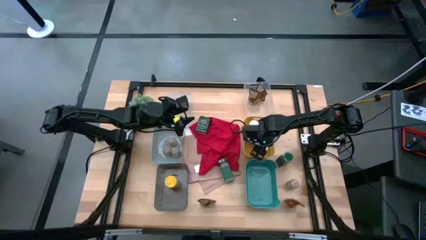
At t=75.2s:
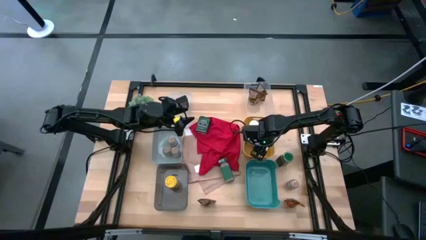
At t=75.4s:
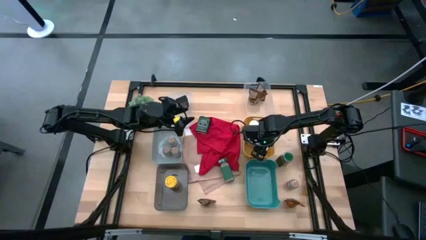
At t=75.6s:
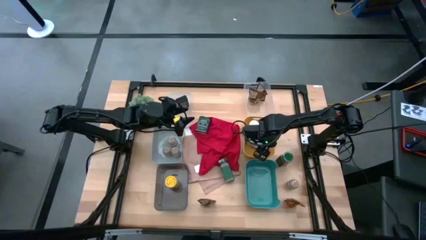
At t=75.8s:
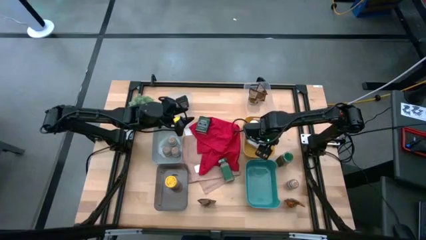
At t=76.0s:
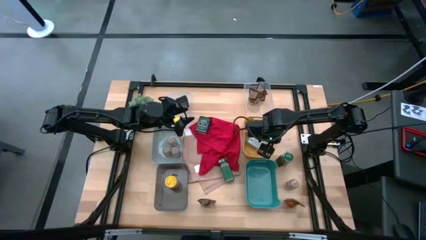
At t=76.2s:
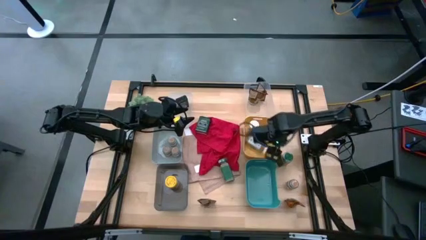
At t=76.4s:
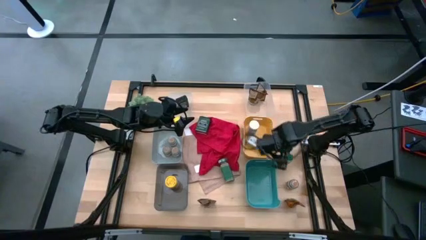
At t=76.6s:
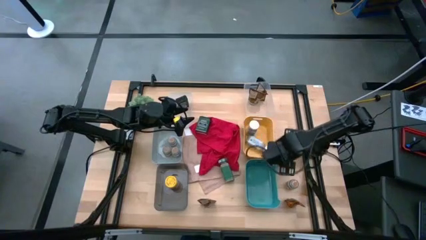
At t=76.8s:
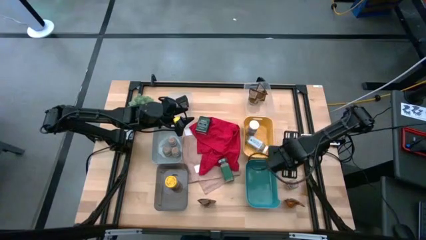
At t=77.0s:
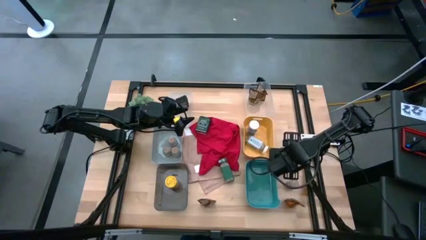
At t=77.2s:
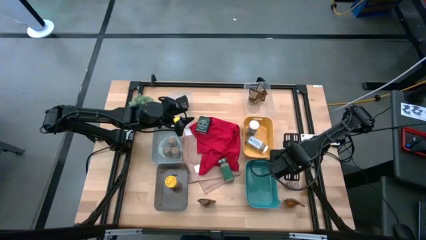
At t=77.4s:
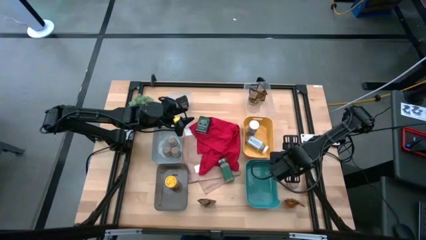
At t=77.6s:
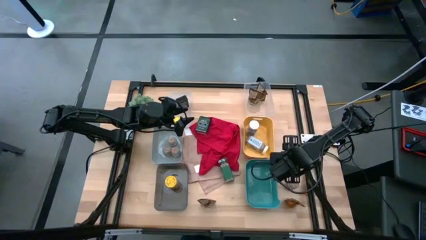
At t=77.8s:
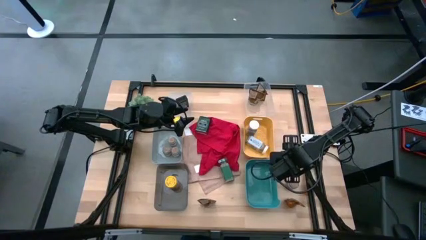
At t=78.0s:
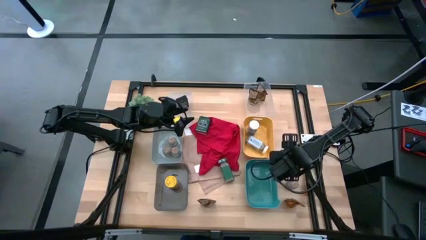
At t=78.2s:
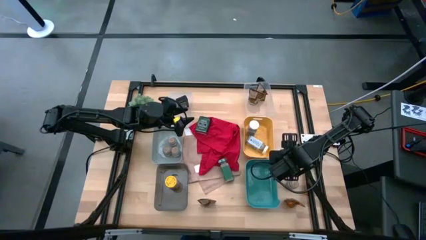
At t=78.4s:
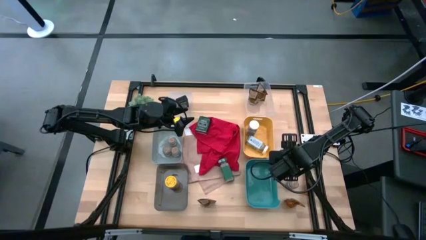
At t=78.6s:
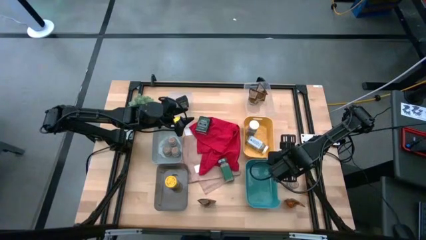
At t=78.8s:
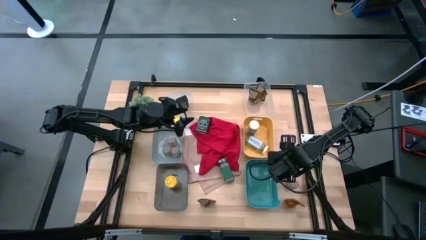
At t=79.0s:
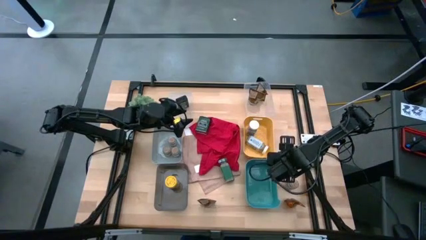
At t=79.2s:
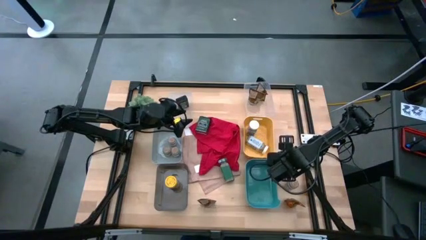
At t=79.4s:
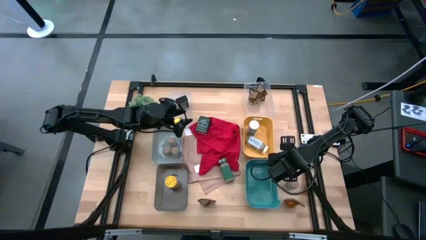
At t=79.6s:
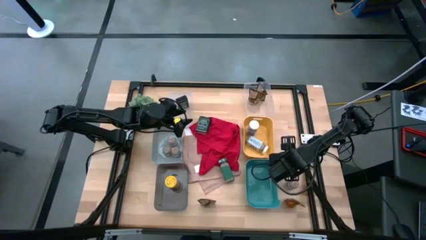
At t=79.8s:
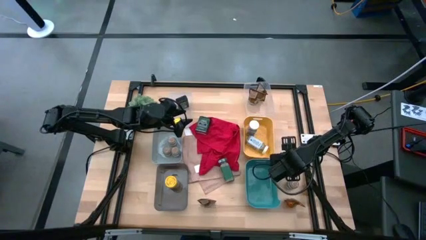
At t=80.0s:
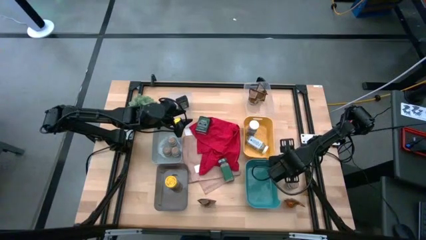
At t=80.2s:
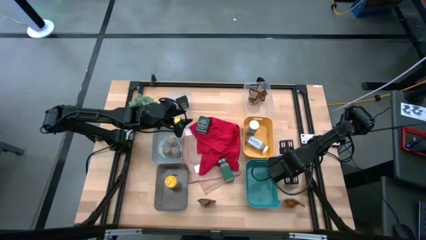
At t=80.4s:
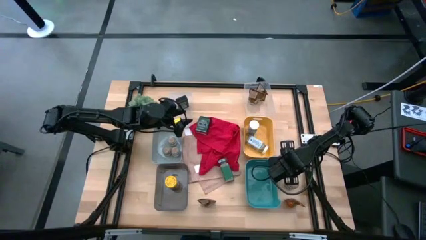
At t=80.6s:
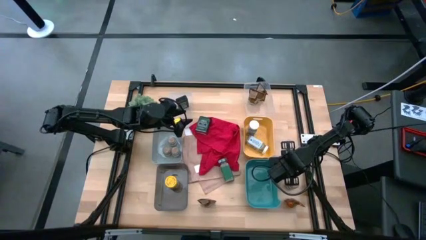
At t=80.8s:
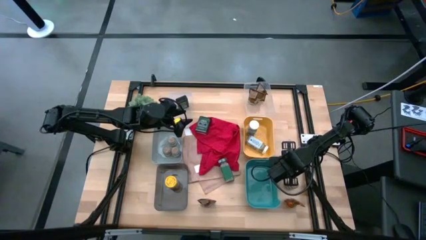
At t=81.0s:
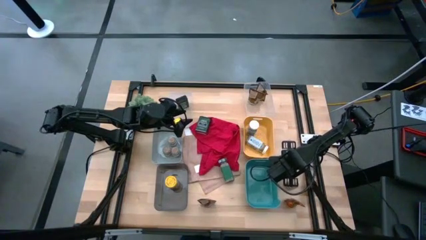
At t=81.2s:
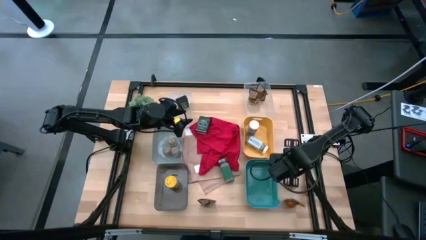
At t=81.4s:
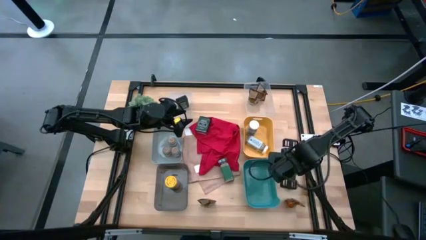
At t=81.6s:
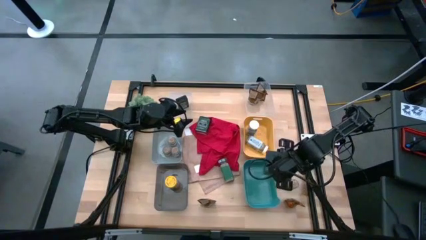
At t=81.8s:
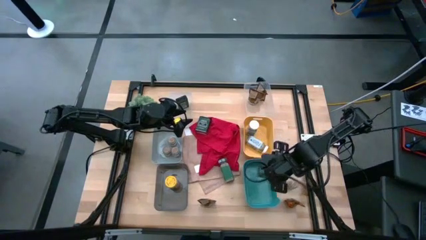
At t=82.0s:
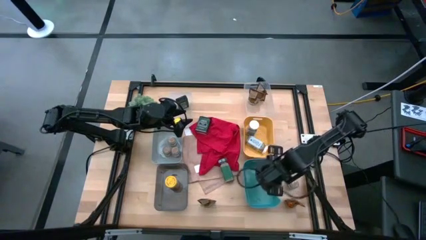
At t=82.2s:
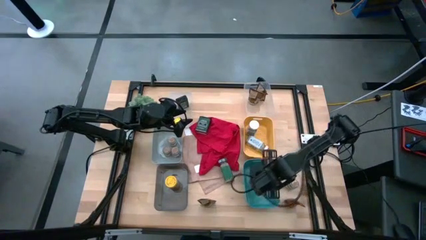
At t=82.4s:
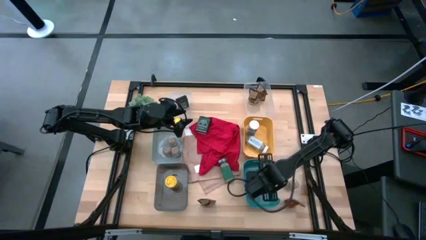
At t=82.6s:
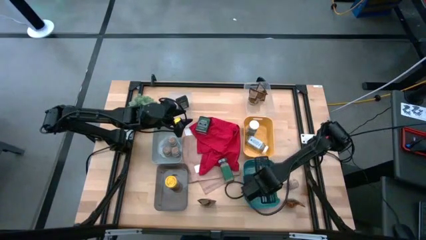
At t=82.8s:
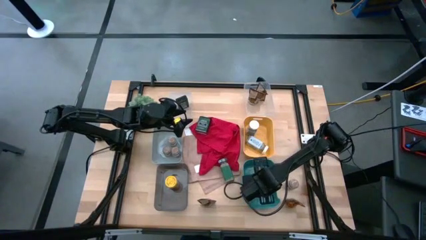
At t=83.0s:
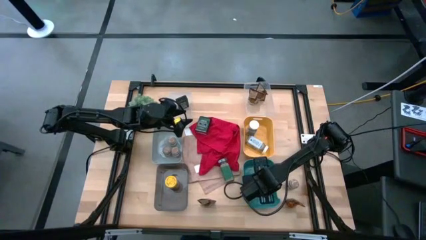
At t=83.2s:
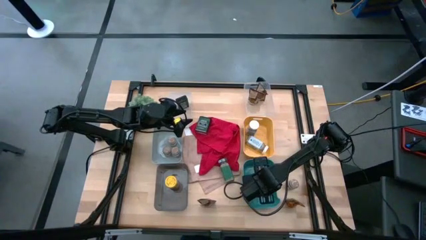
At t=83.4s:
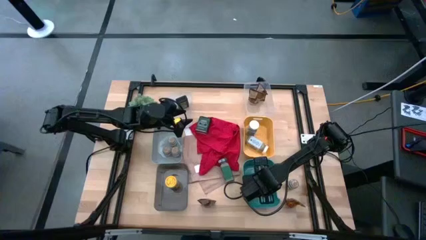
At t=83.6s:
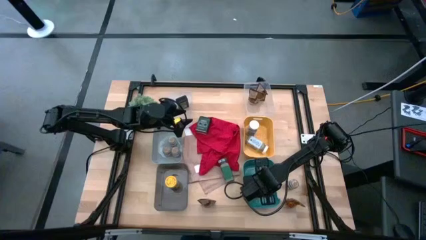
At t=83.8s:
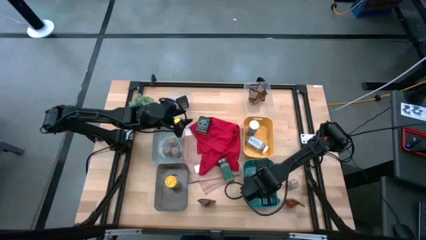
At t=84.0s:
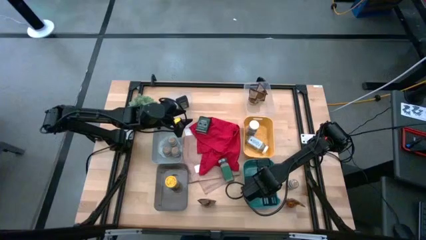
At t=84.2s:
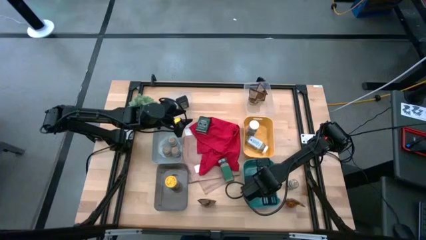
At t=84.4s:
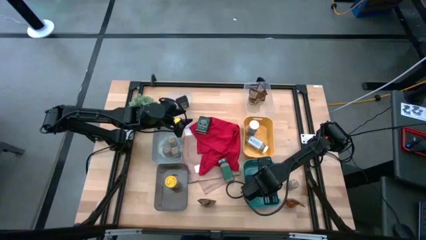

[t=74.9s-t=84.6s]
Task: Sort spices by type
Put the right green seasoning bottle into the green bin

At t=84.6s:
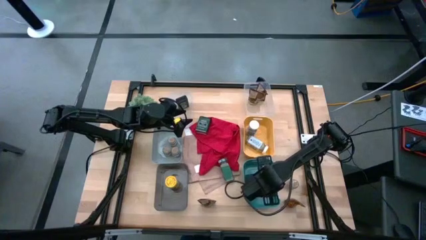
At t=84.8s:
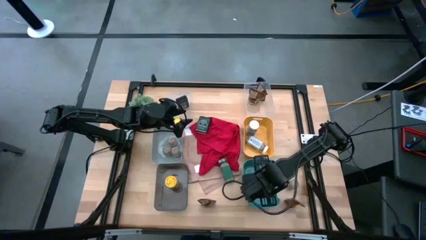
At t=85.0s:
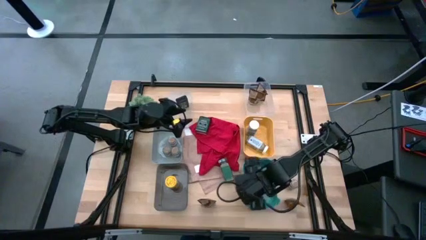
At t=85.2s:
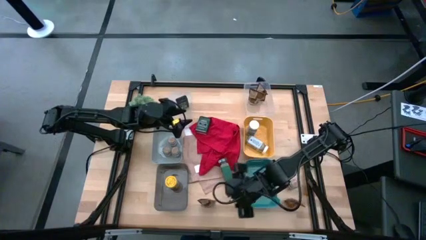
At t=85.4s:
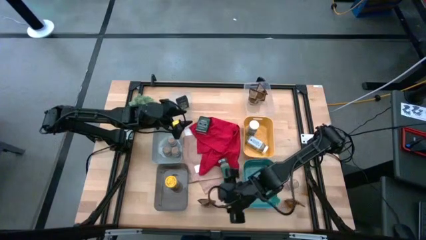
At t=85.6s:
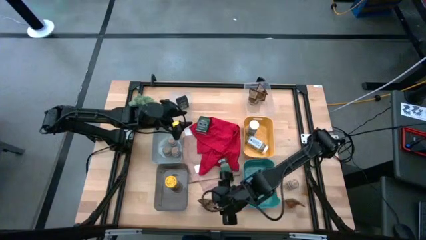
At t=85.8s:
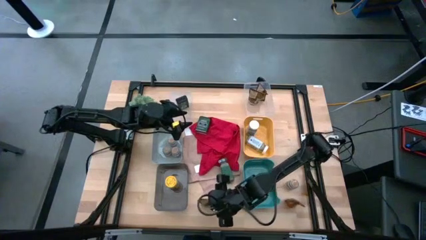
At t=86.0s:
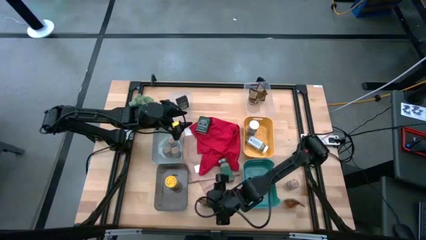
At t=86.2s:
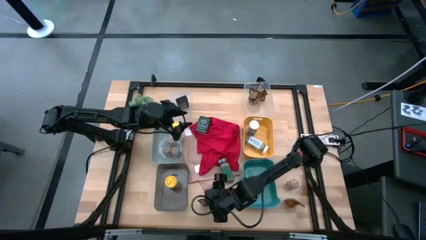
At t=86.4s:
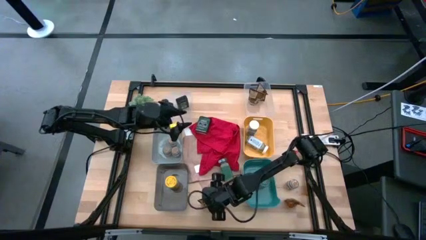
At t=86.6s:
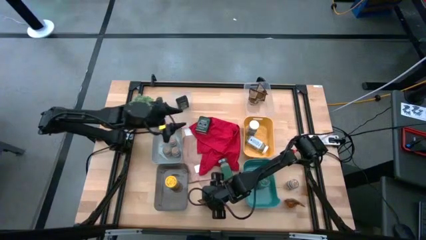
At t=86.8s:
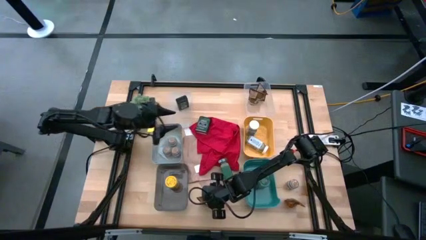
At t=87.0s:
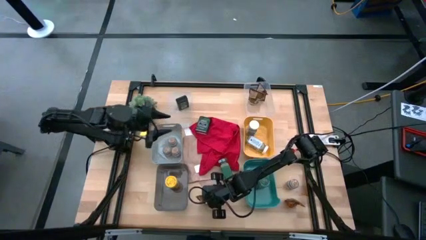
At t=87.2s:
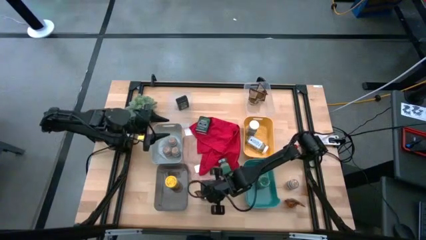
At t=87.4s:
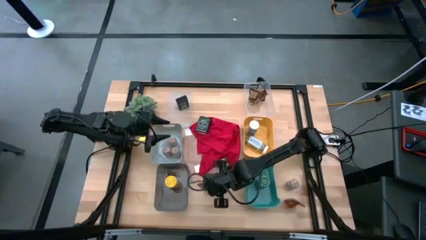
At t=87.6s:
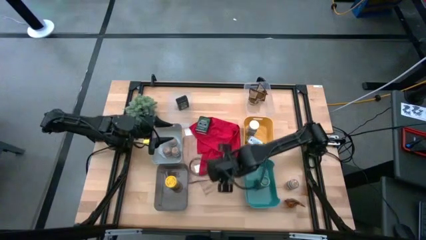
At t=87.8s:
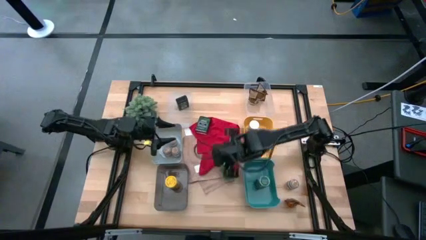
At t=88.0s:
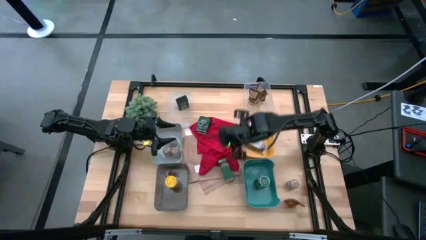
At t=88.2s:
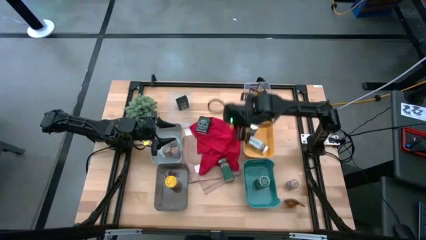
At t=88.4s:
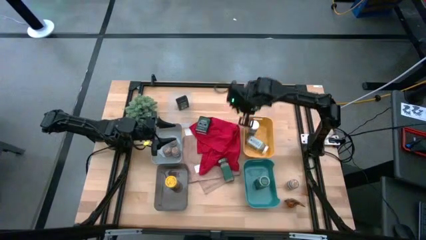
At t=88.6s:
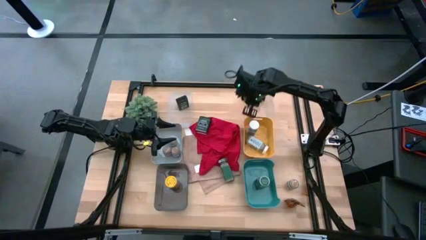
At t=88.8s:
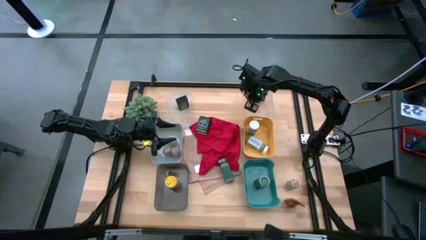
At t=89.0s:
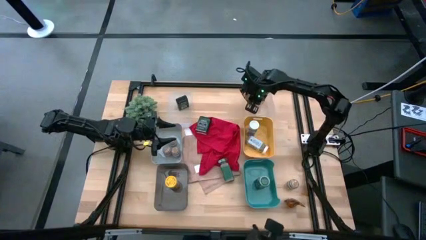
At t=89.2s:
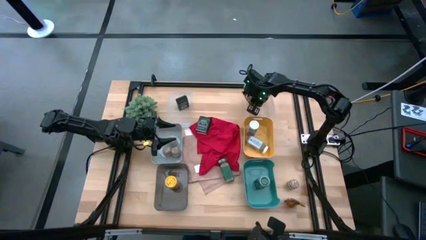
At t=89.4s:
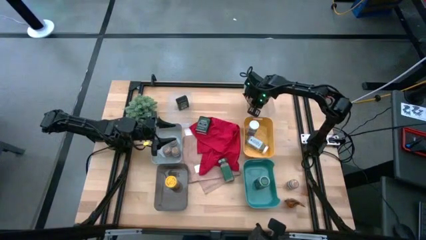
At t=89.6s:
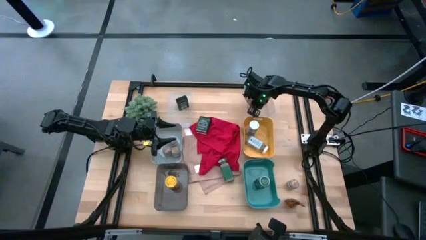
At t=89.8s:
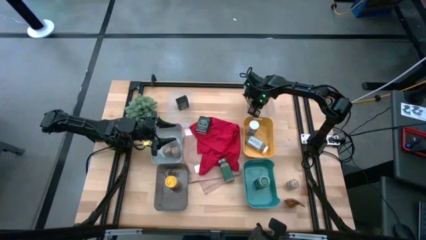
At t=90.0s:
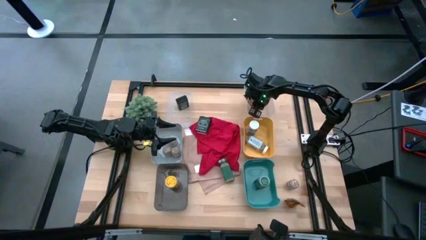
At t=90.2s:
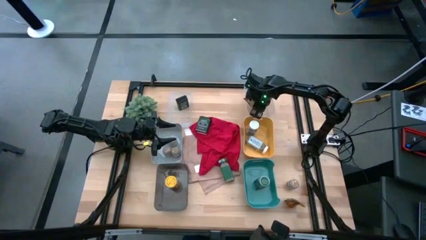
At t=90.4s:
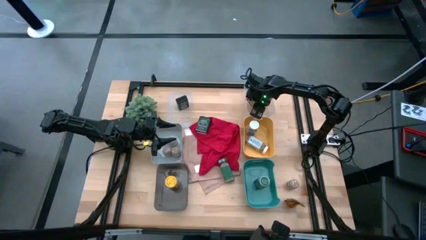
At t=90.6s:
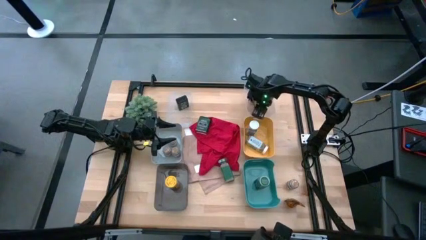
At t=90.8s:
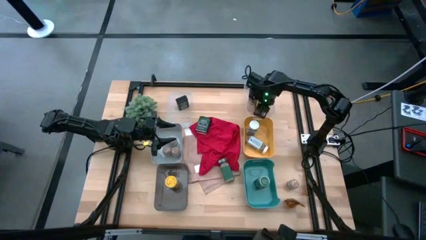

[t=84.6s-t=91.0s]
Put the left orange seasoning bag into the right transparent bin

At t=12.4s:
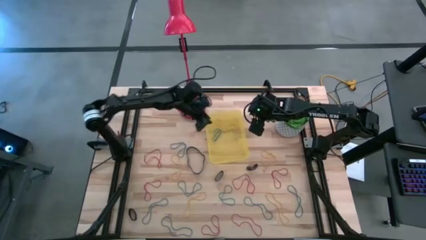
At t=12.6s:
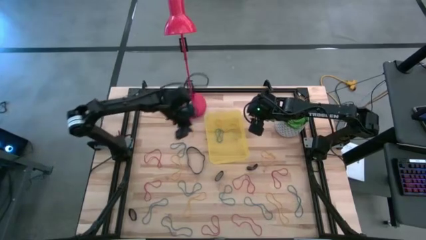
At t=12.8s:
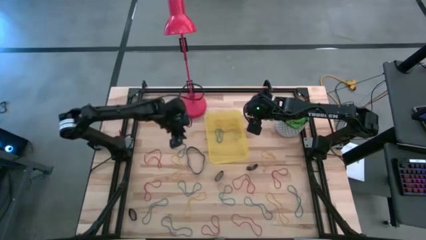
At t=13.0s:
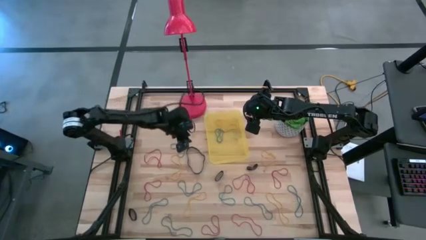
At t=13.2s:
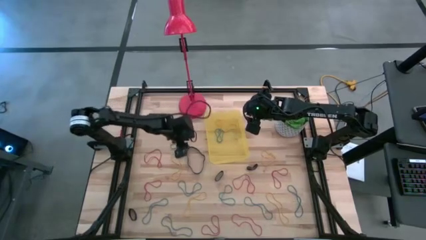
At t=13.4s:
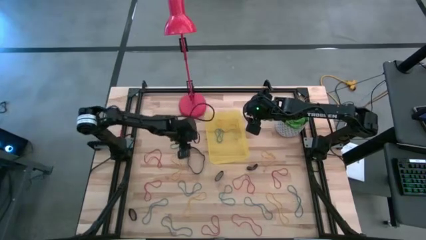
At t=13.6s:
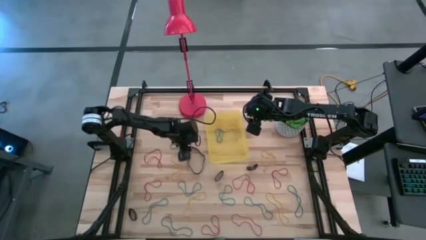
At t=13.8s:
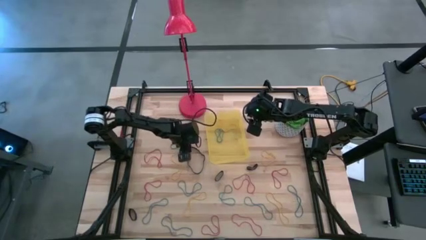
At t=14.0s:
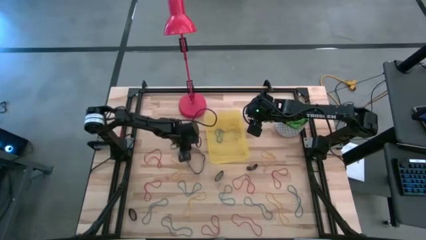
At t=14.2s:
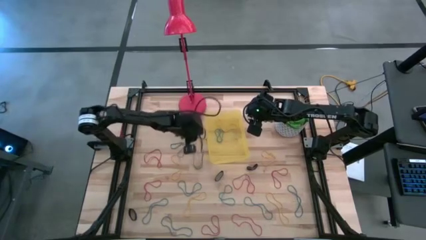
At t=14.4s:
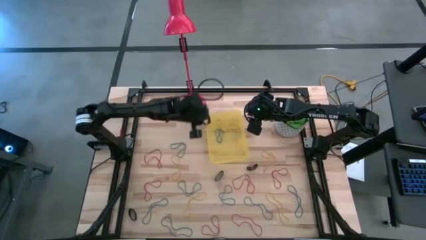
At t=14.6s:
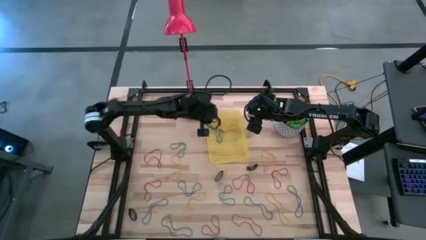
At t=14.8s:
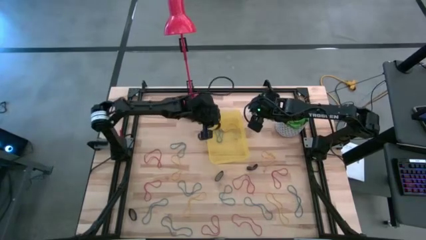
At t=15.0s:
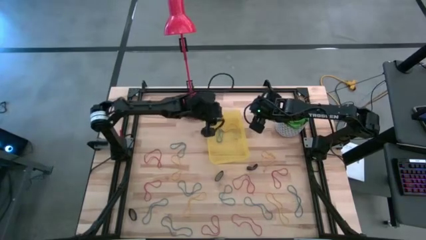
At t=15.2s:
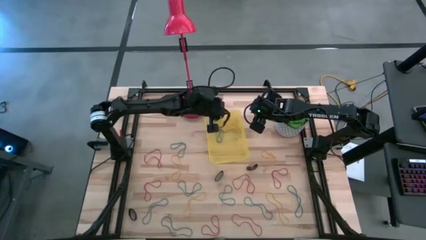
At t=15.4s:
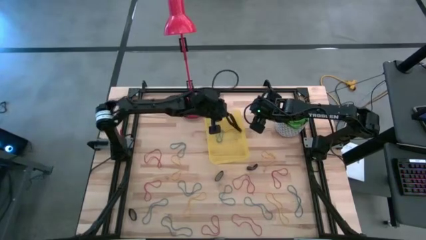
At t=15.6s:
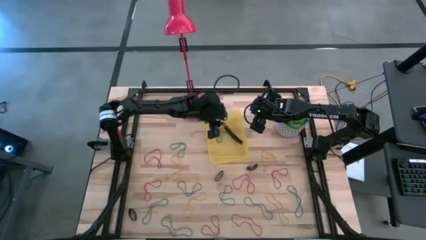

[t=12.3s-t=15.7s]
Task: Pick and place rubber bands into bin
Put the black rubber band into the yellow bin
